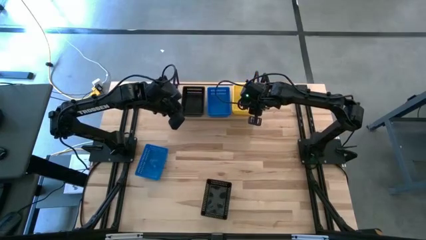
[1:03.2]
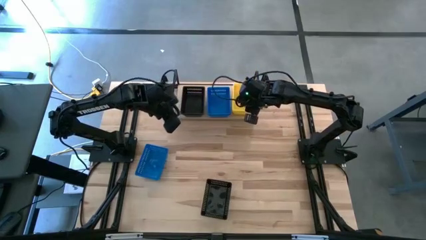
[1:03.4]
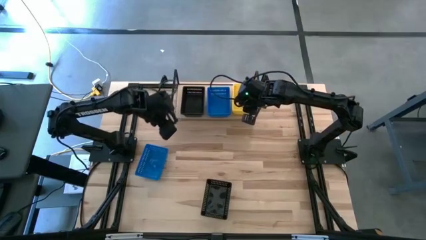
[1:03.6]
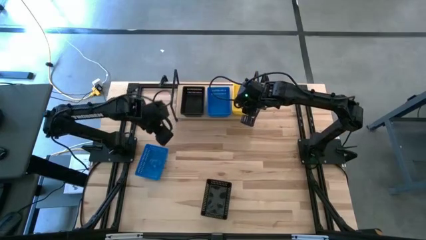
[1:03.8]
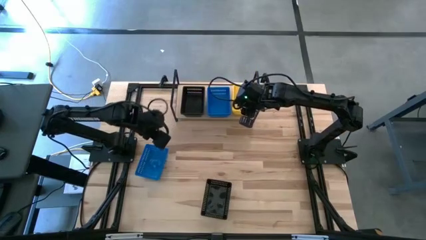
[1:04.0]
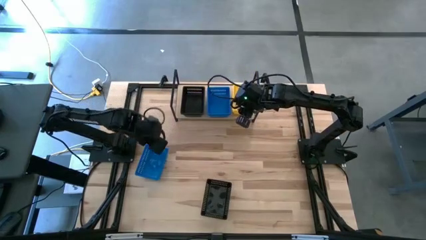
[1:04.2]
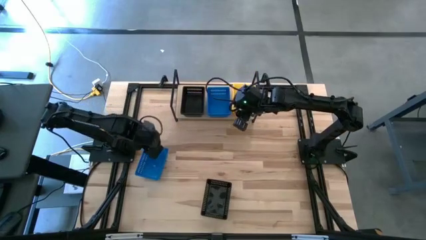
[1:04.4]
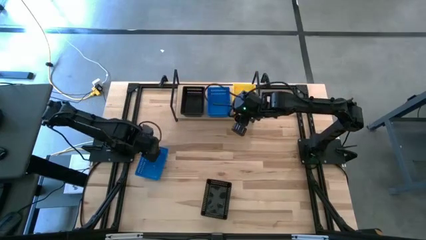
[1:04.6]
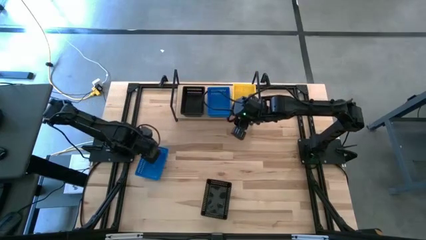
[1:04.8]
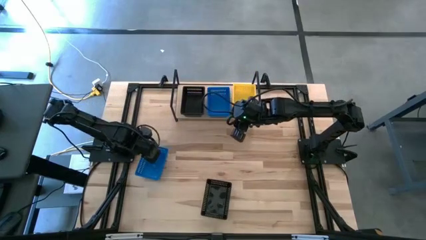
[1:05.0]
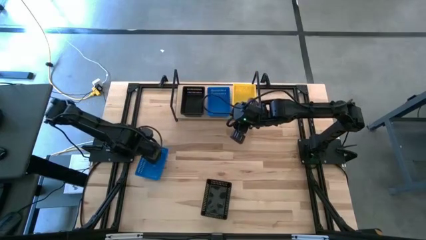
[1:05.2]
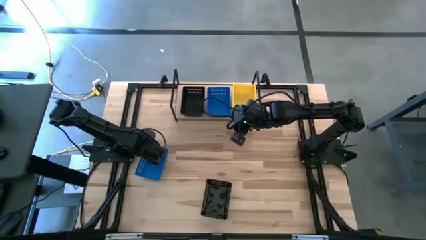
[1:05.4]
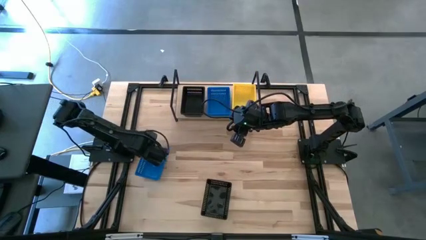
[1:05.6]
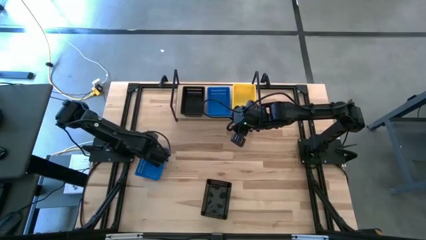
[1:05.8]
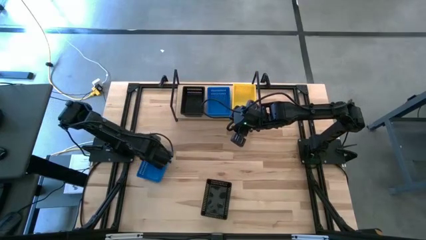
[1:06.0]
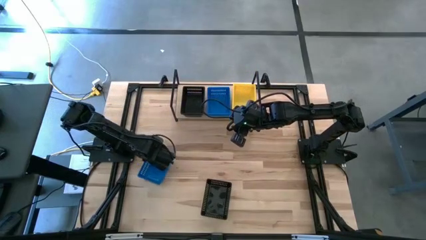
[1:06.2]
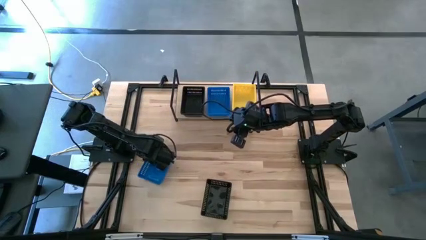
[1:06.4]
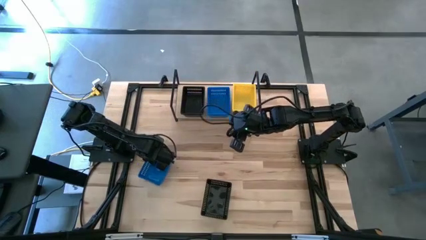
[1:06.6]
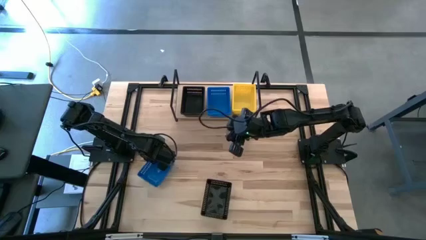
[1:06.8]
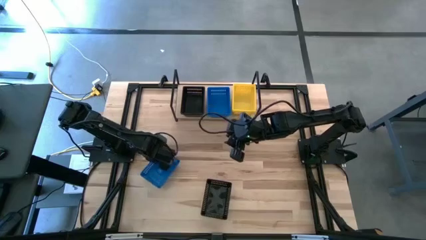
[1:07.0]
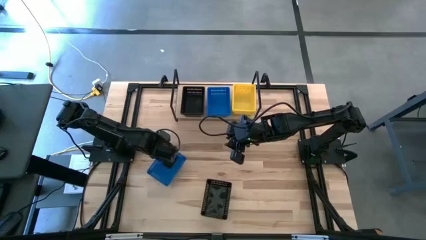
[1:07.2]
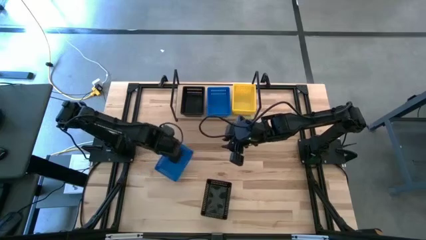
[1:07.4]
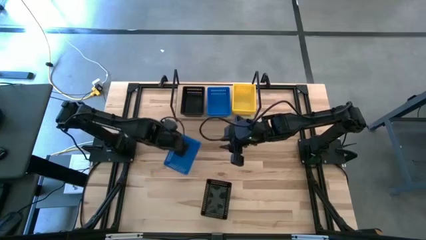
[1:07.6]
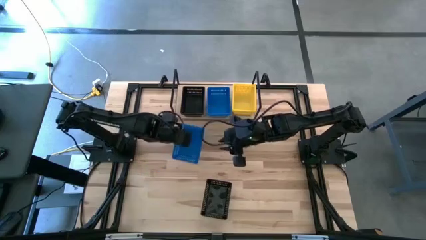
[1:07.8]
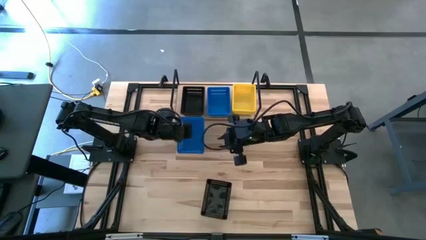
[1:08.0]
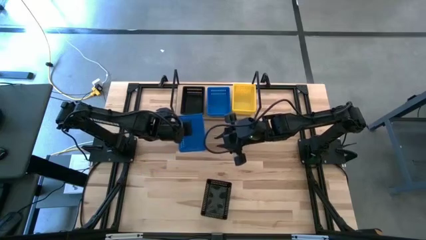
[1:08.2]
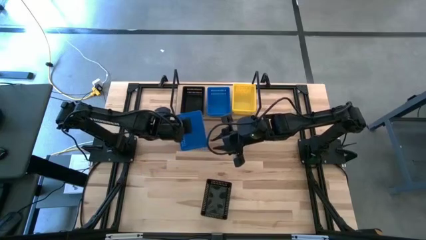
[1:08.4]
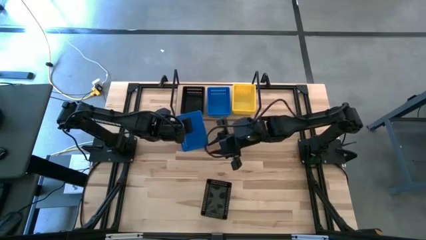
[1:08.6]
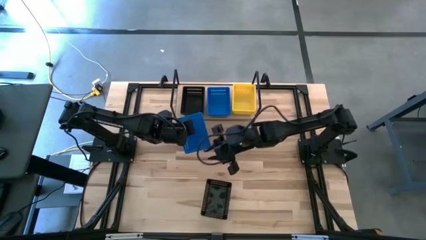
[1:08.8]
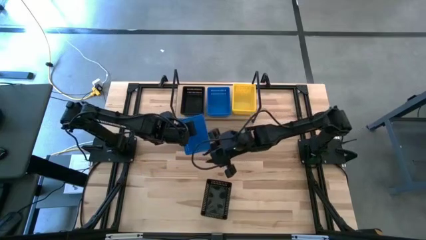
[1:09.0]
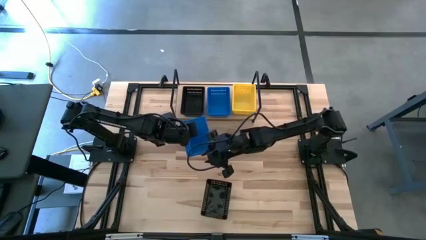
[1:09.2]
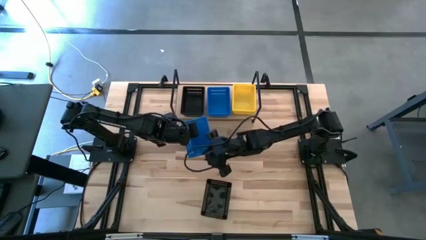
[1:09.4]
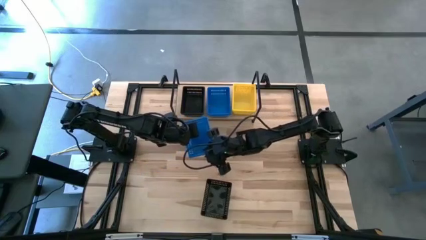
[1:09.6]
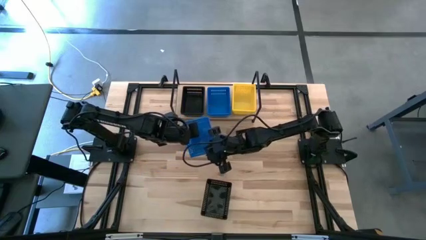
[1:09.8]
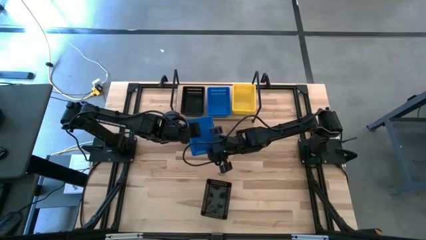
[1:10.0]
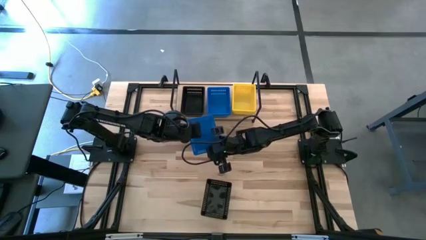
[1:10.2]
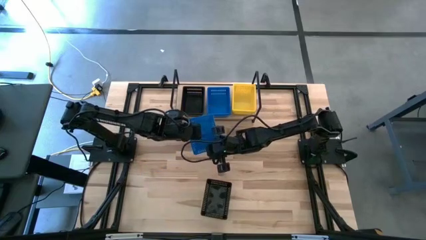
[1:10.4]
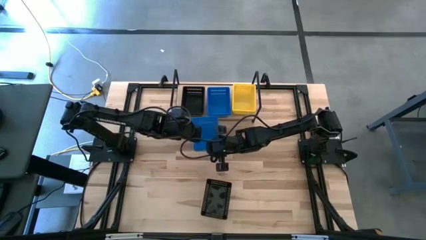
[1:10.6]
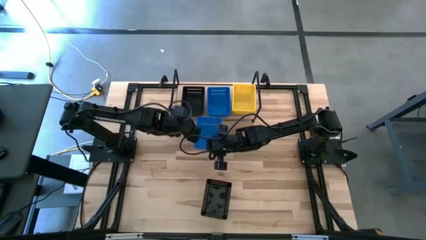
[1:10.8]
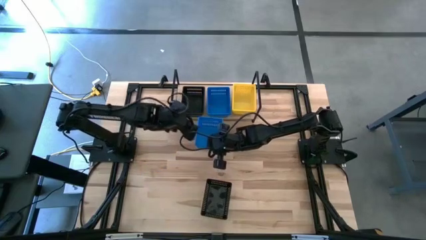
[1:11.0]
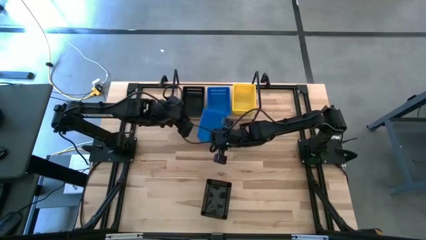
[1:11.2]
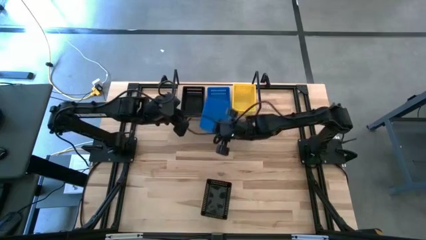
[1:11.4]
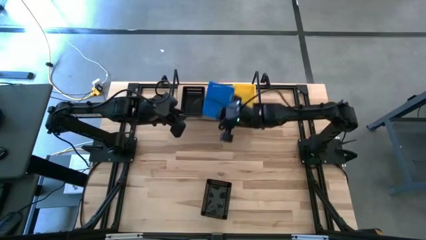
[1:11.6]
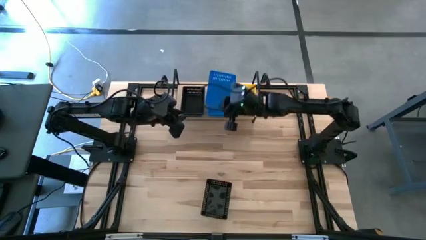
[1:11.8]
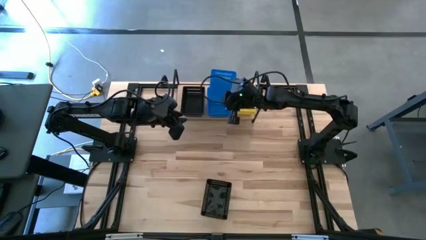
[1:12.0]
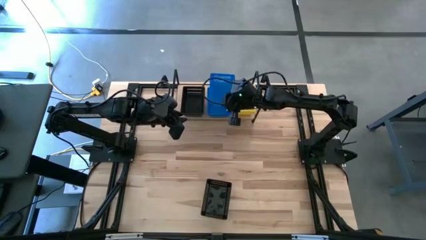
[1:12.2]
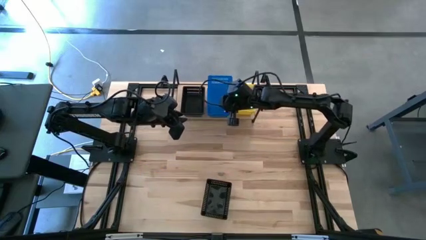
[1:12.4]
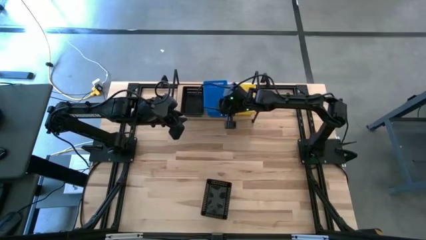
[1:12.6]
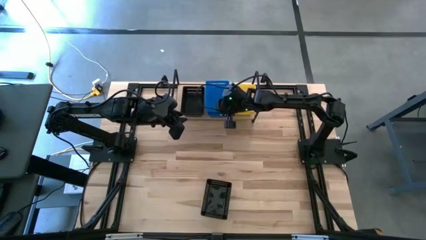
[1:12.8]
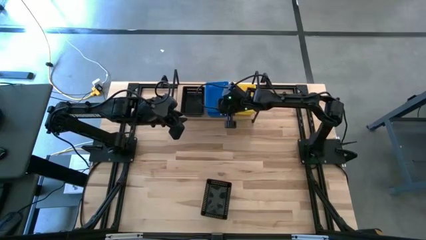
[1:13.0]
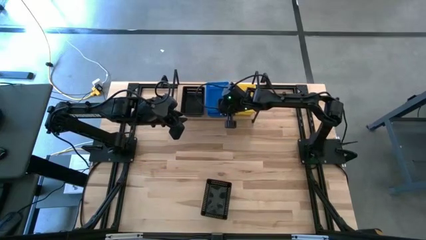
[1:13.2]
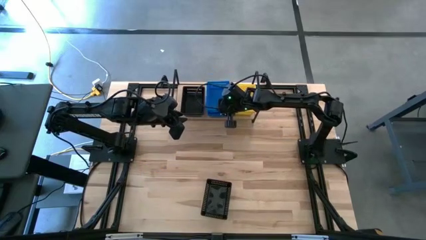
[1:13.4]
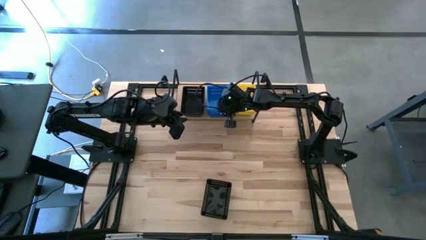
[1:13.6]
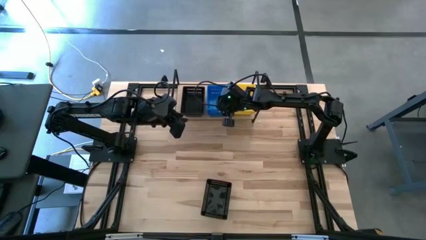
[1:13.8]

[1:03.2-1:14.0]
Task: Stack baskets on shelf by color
Stack the blue bin on top of the blue bin on the shelf
